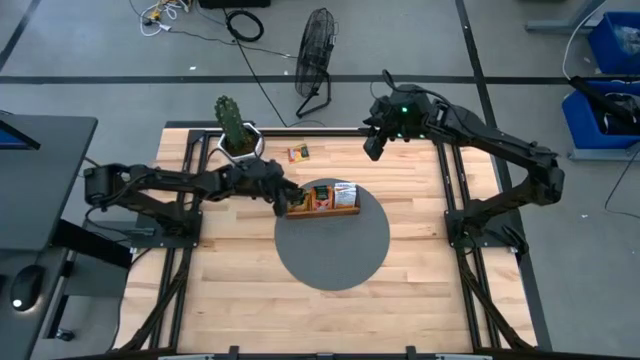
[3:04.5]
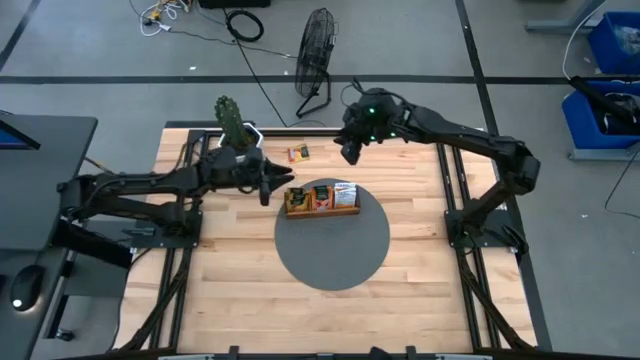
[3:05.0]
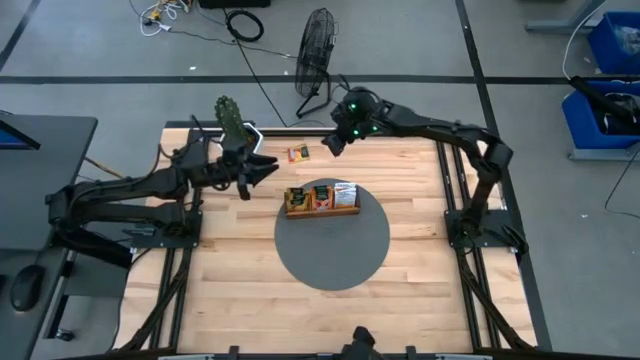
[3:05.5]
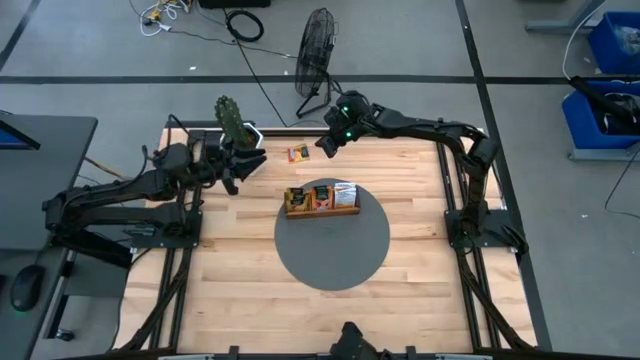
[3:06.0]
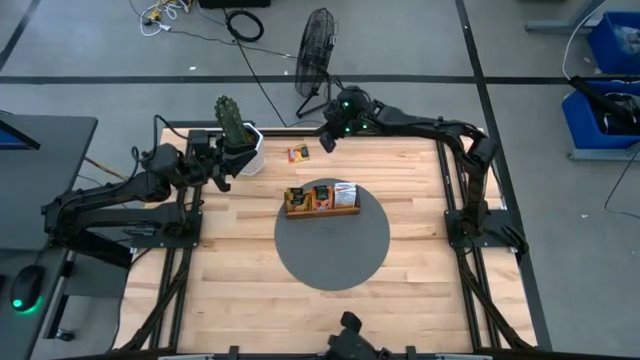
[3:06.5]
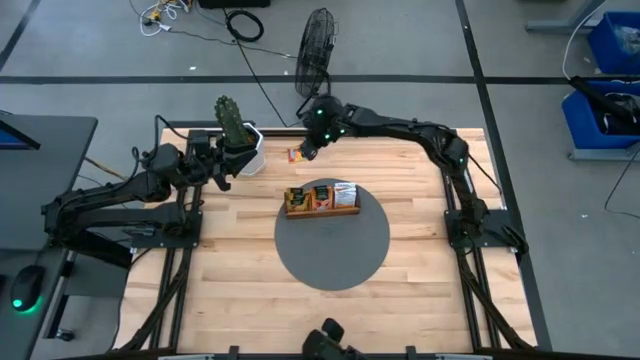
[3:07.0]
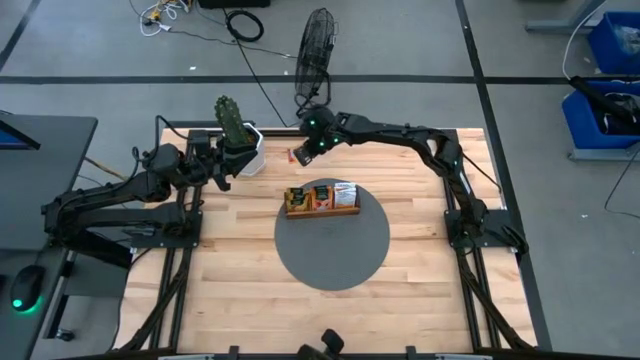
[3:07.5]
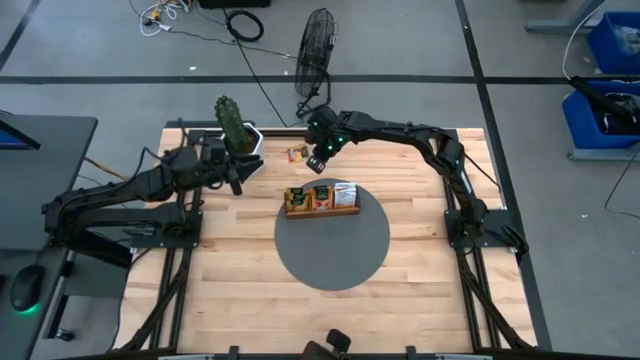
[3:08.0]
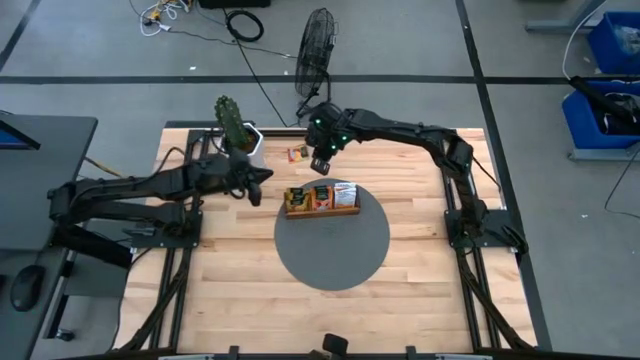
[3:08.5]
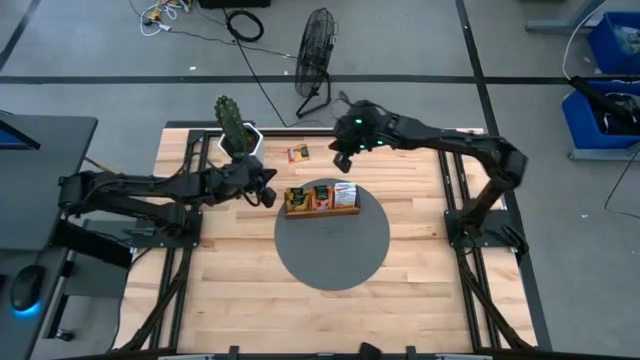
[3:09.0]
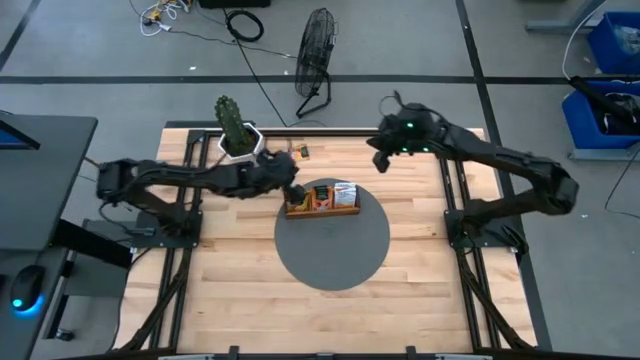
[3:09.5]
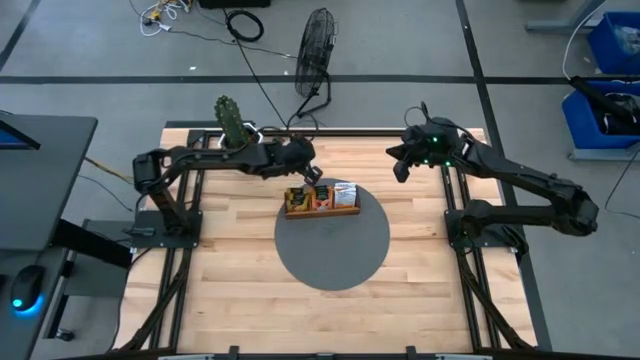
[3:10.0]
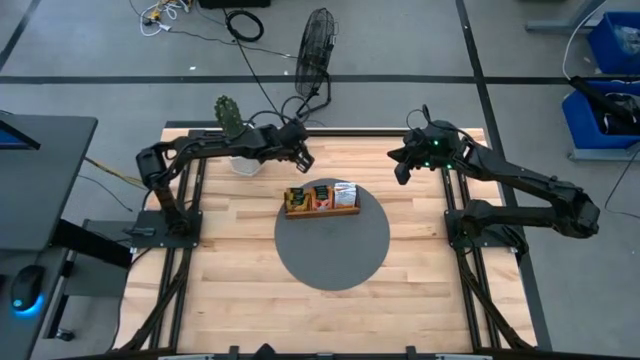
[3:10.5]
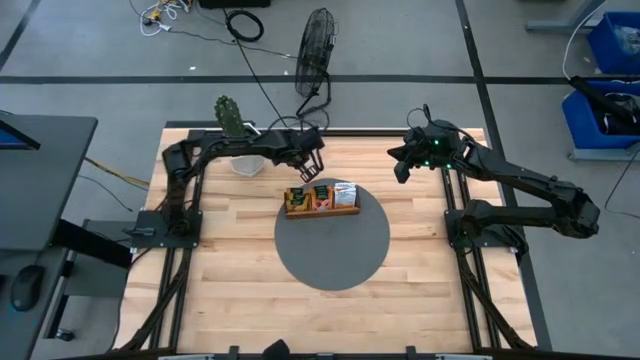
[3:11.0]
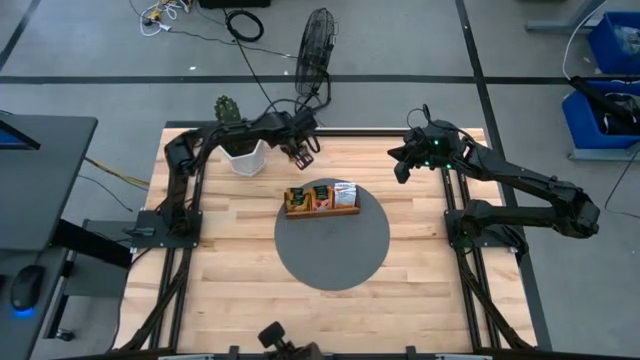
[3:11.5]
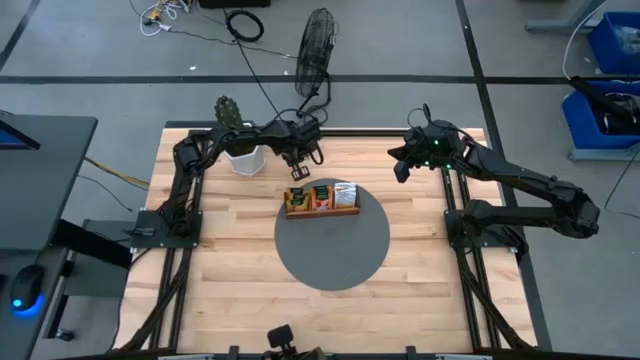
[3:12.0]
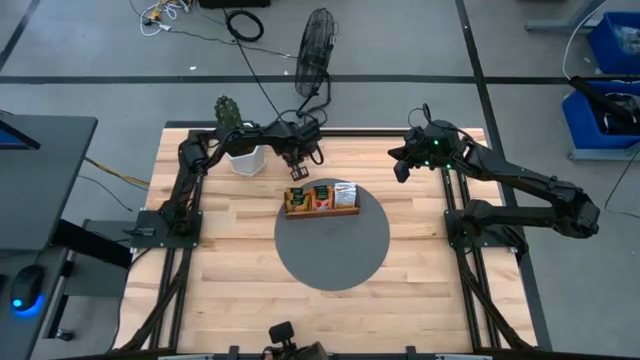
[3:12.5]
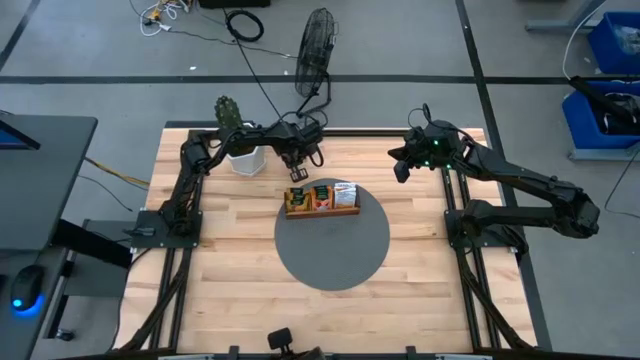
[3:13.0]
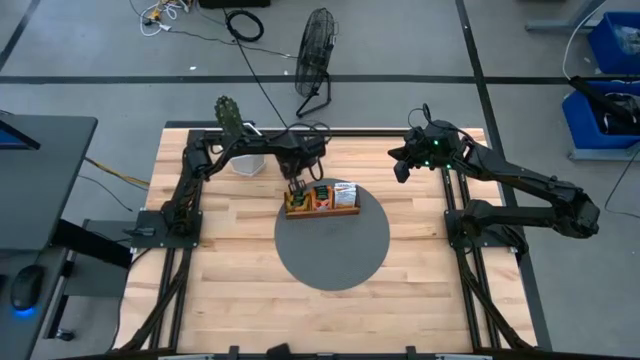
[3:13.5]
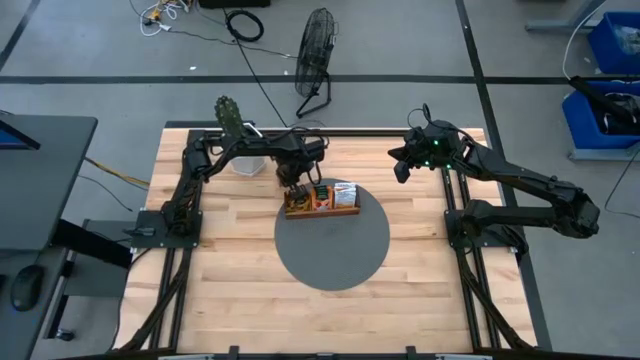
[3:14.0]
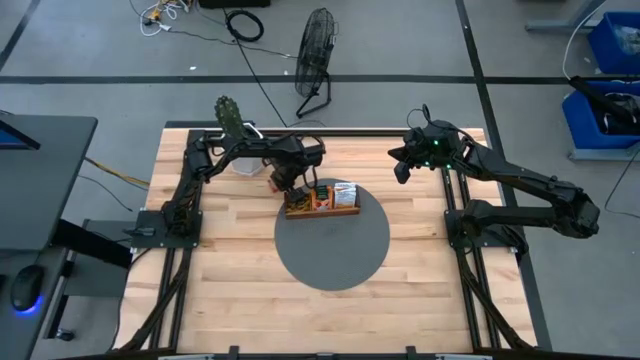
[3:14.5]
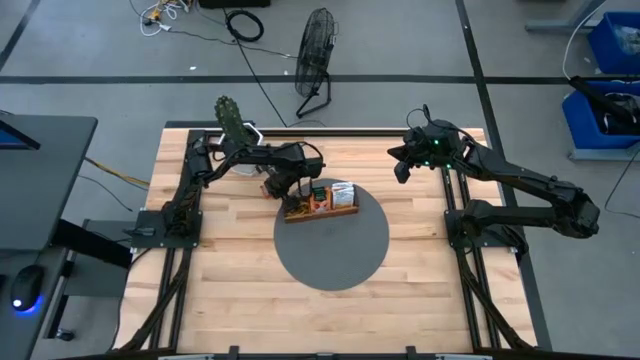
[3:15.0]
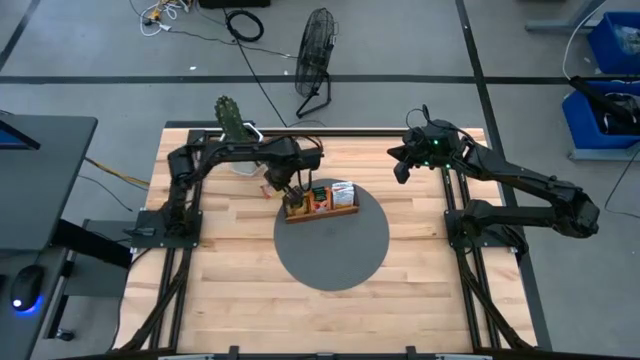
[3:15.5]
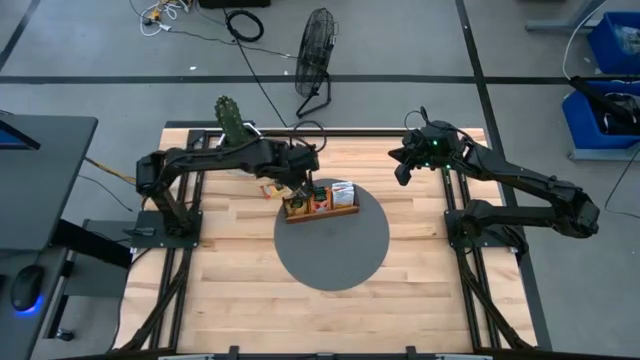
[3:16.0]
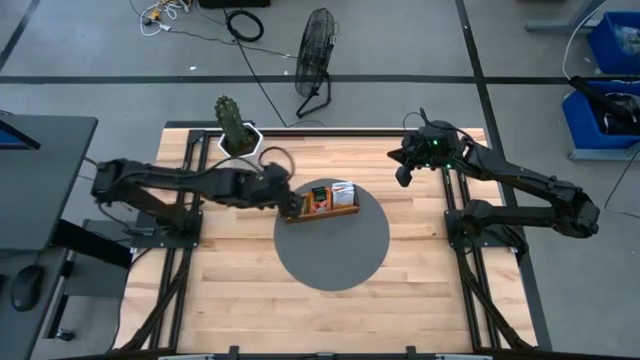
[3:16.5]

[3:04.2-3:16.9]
Task: Pick & Place Tea
Put the orange tea bag into the left section of the wooden organizer

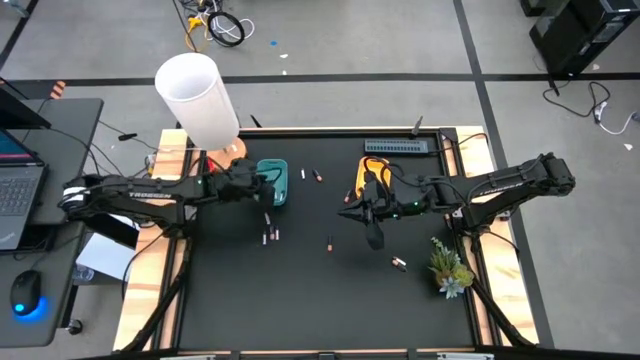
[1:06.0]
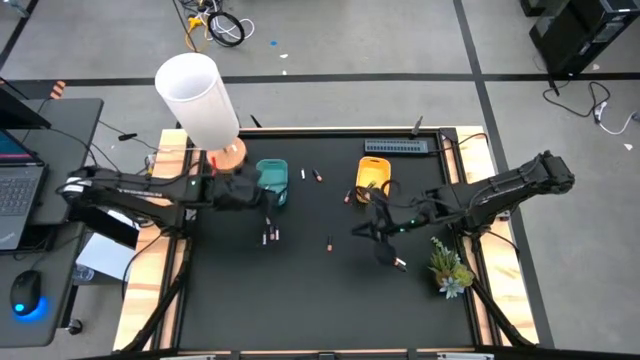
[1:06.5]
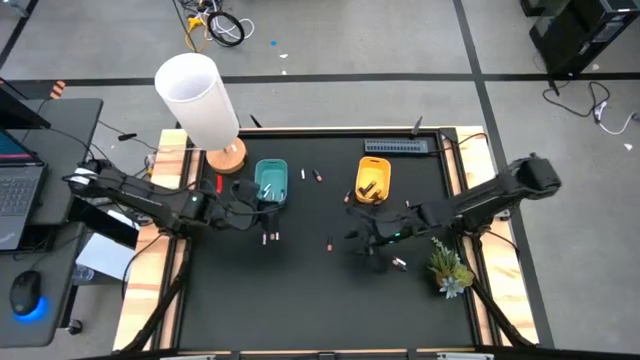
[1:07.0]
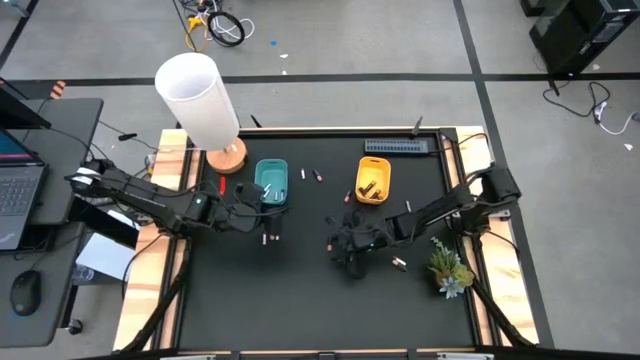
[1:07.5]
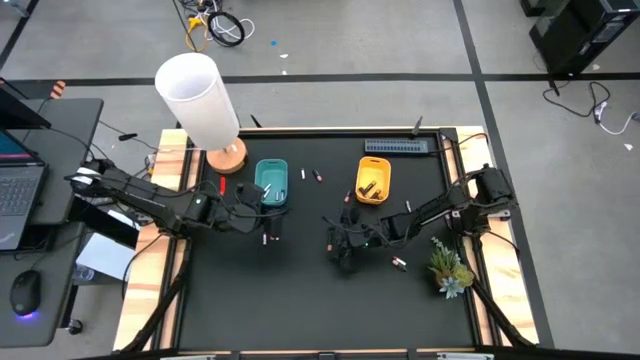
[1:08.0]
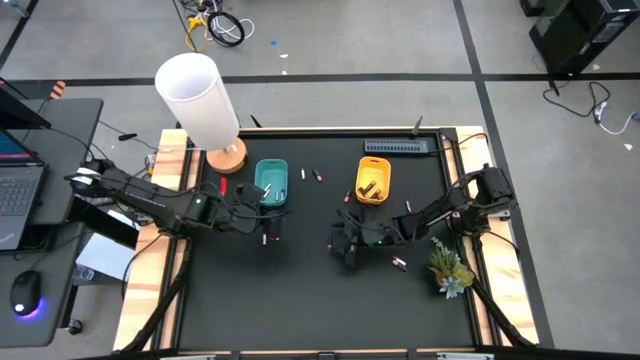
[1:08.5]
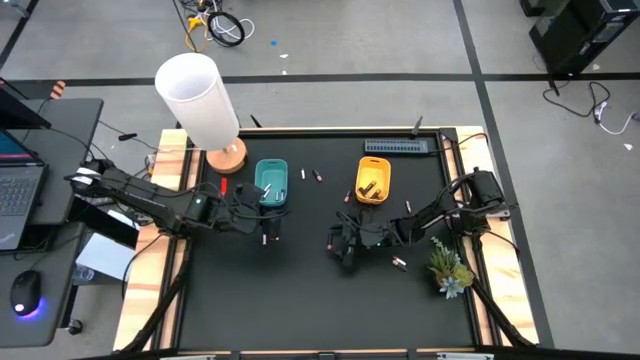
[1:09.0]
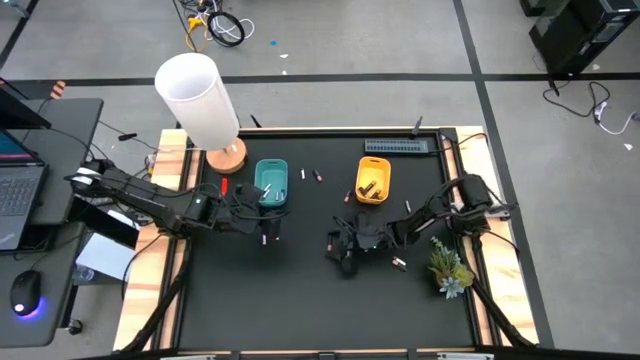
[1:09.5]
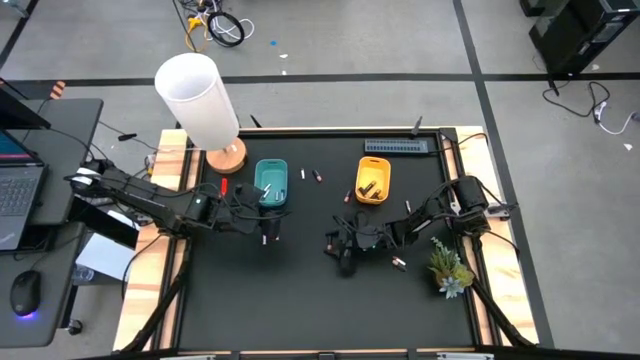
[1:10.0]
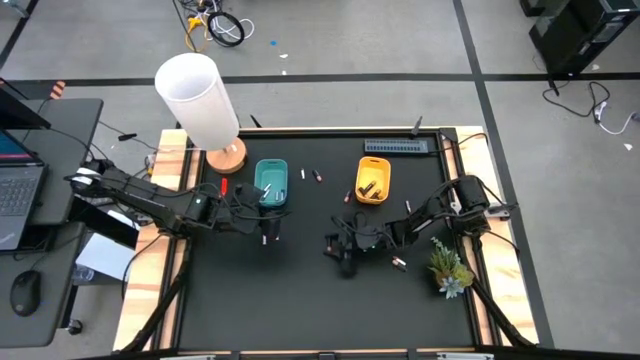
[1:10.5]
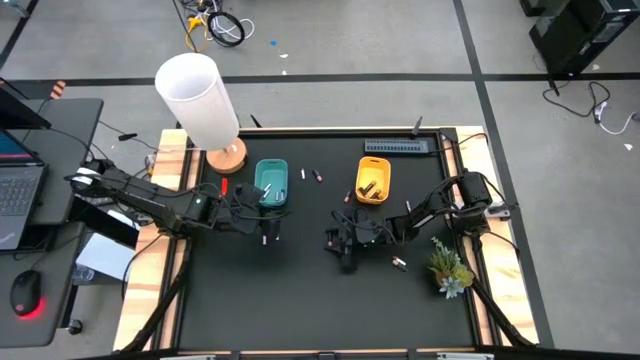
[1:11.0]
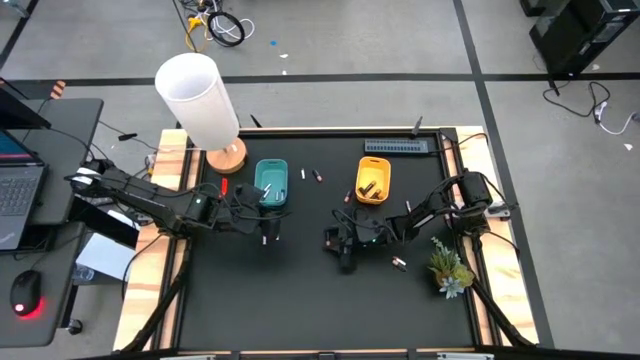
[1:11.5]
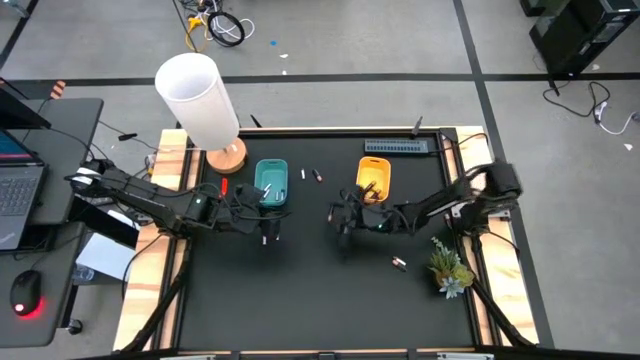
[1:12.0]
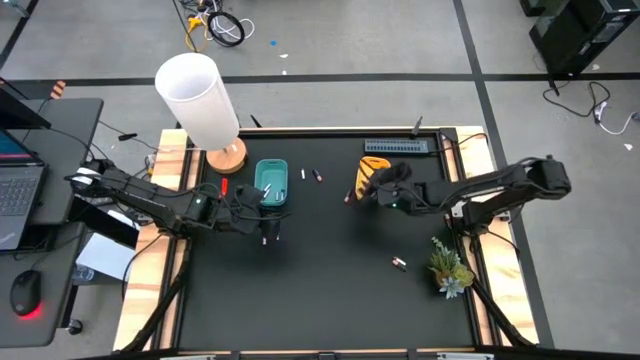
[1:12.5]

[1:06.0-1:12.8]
Task: Sort batteries
Put the black battery into the yellow bin

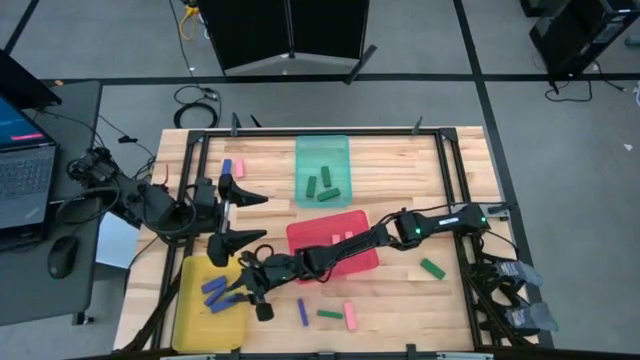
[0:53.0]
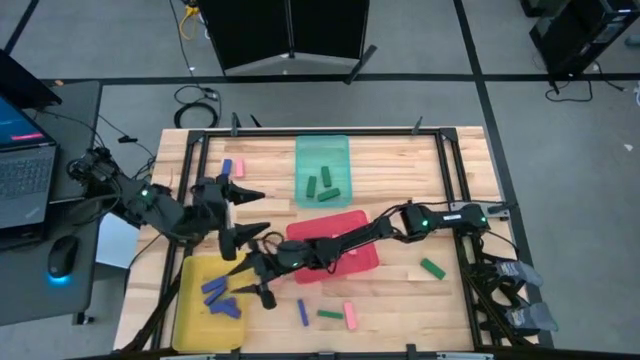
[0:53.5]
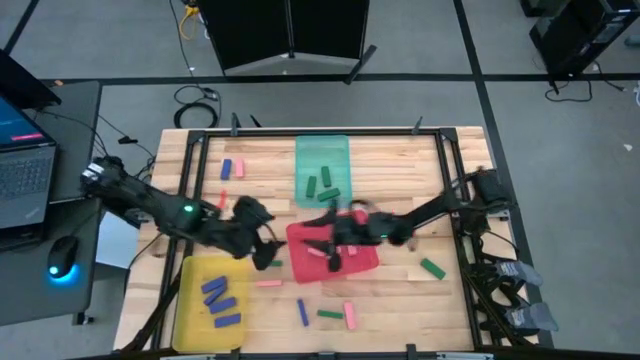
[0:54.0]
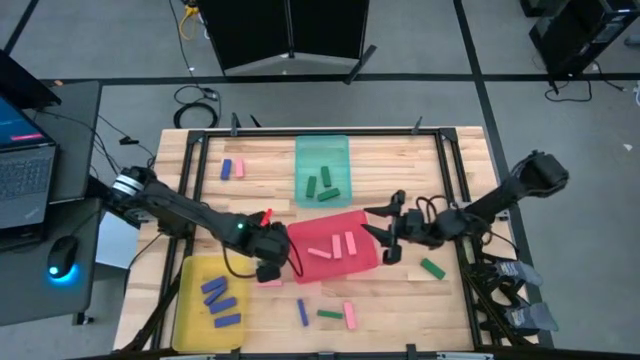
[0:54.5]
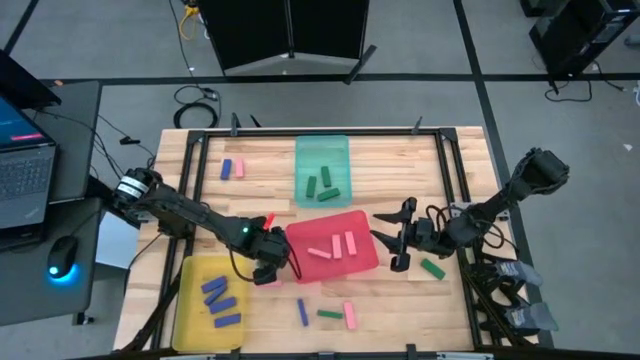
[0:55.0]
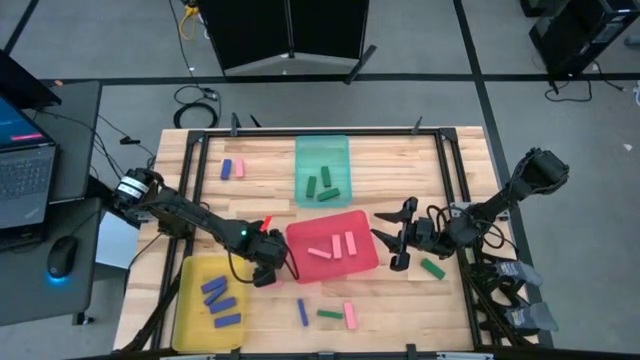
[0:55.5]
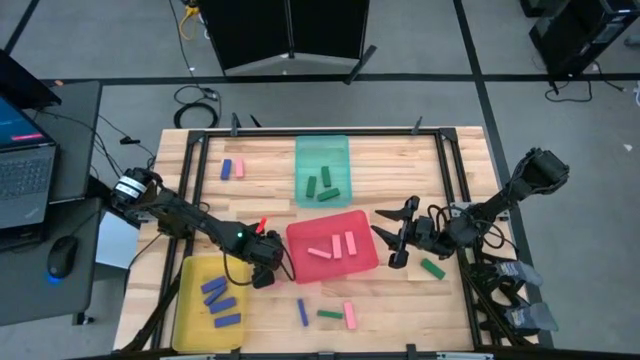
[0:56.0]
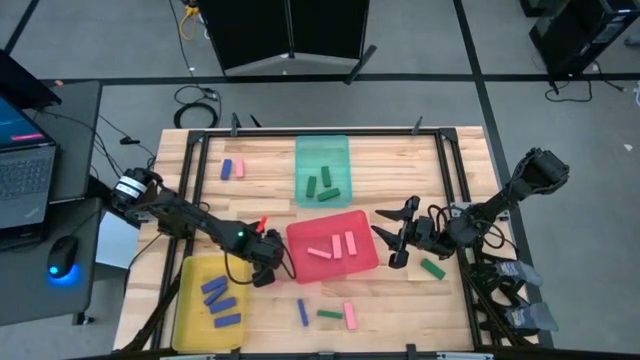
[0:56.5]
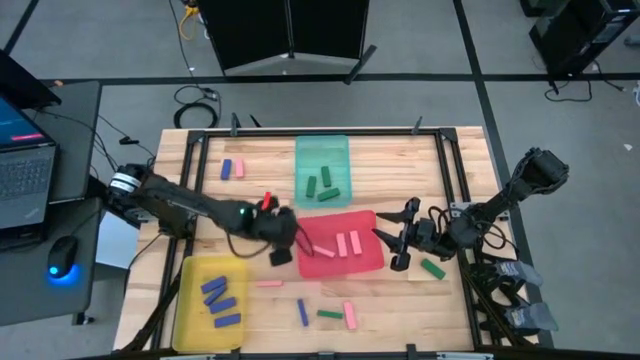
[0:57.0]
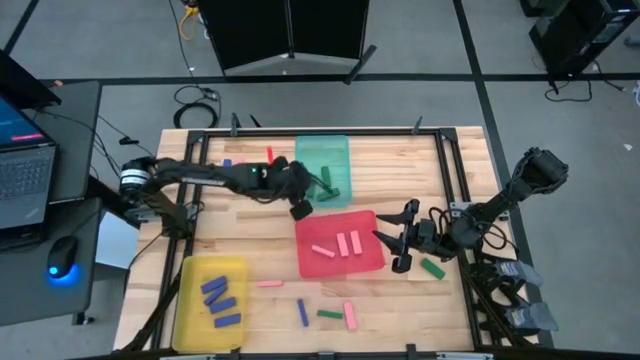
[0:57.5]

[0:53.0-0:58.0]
Task: Sort blocks
Put the green block into the green bin
